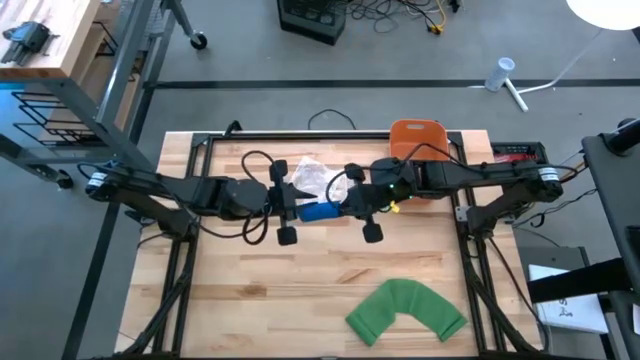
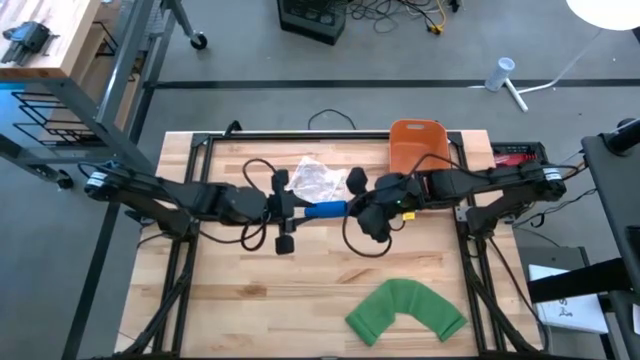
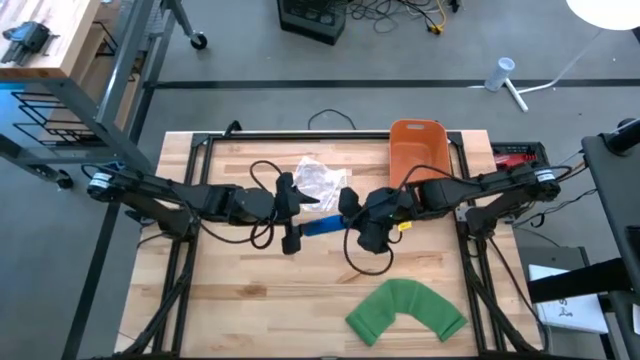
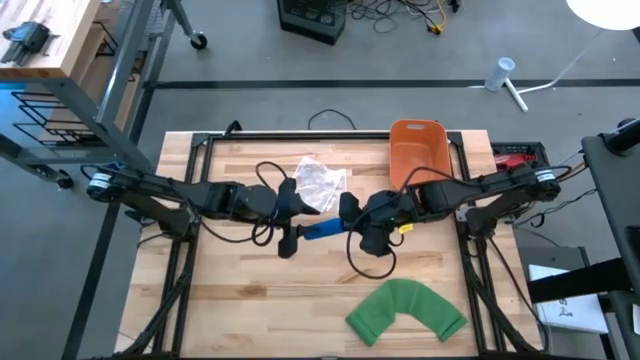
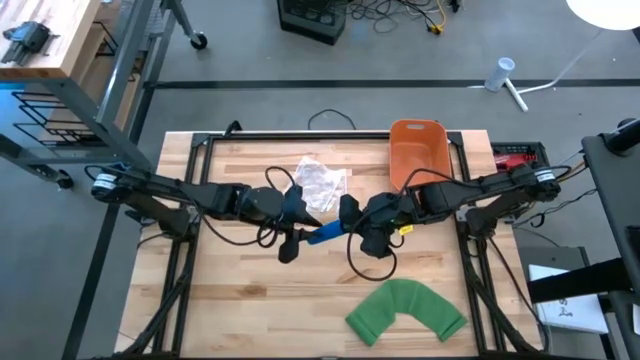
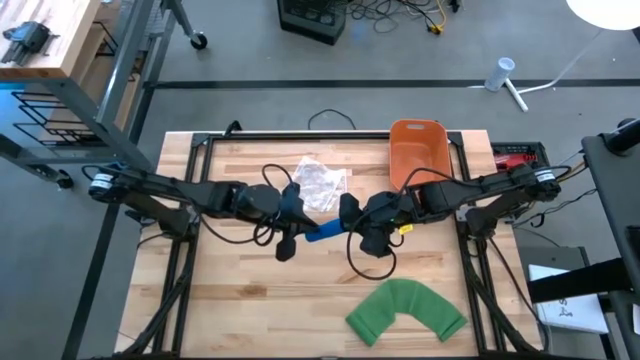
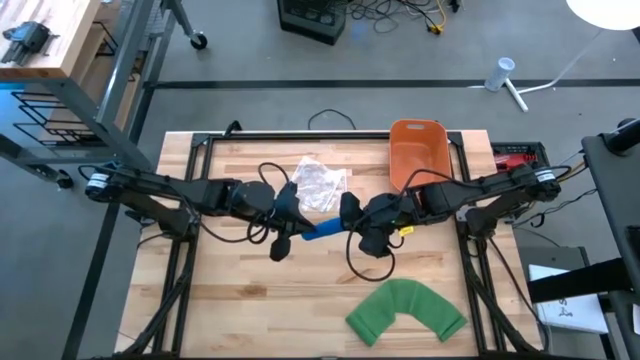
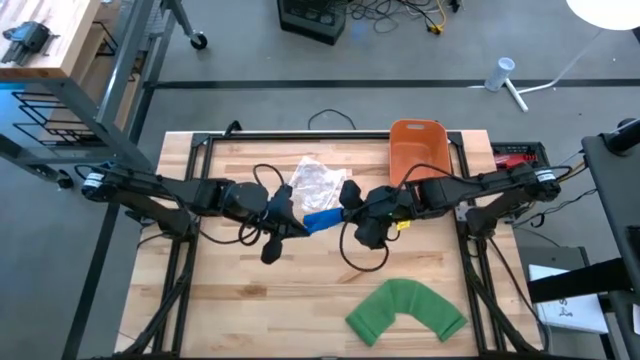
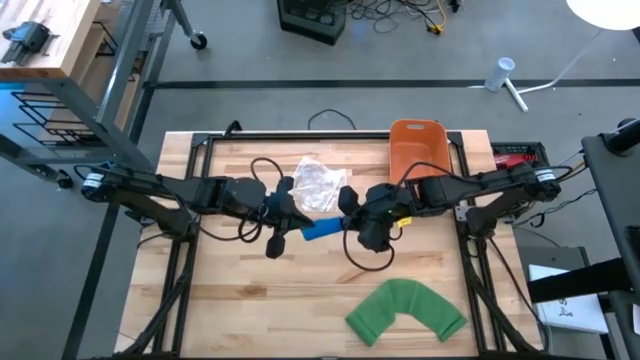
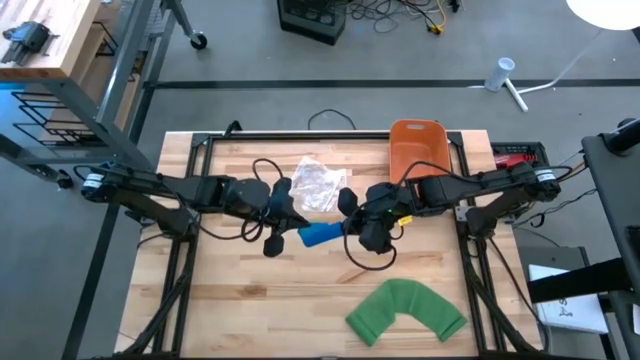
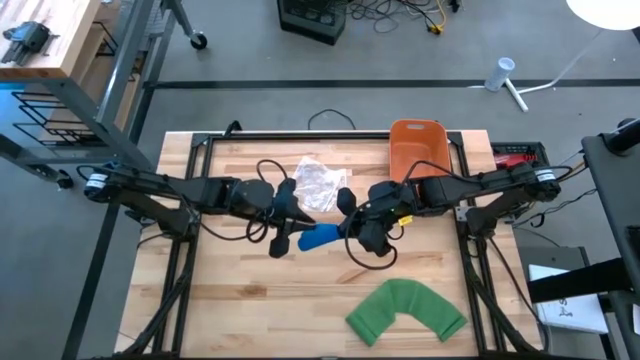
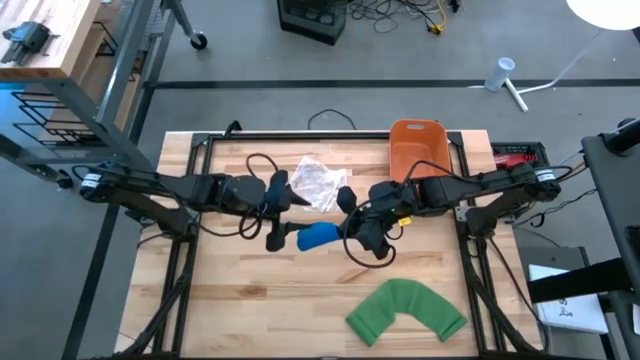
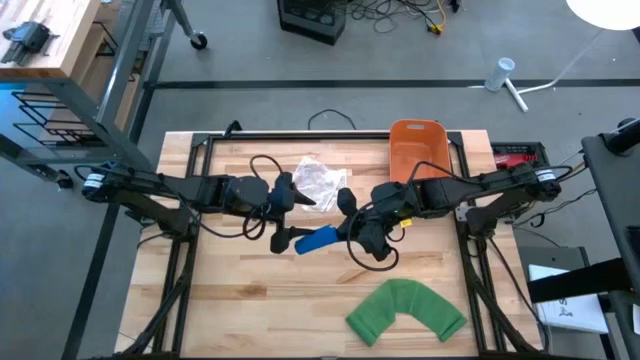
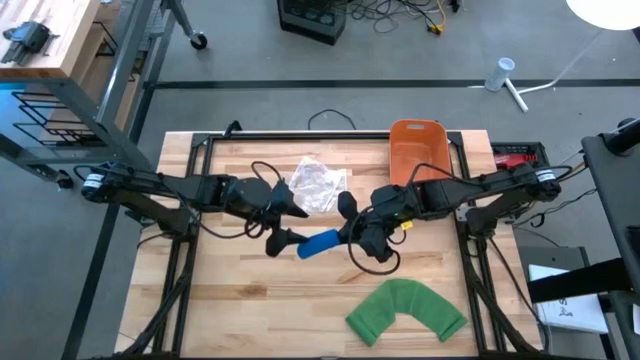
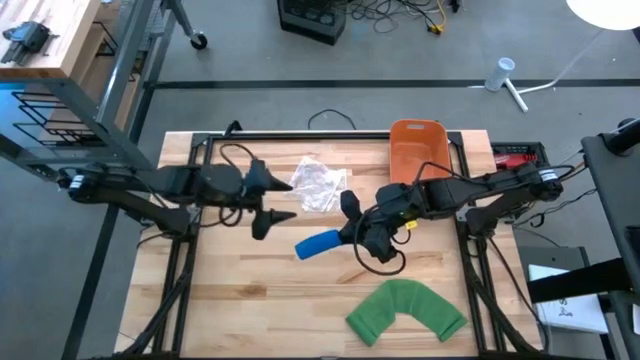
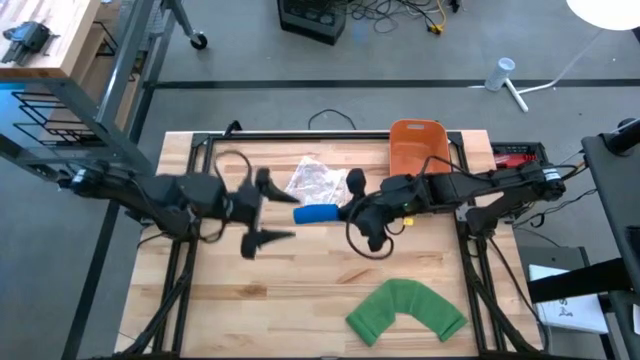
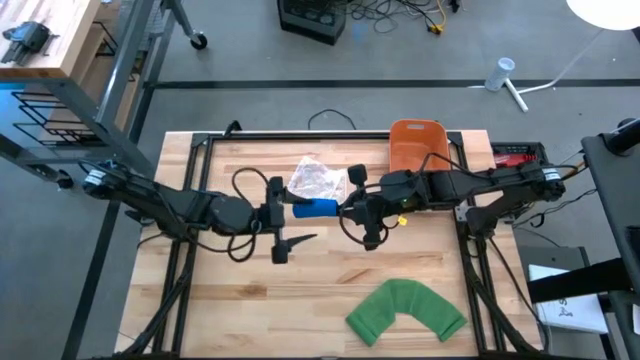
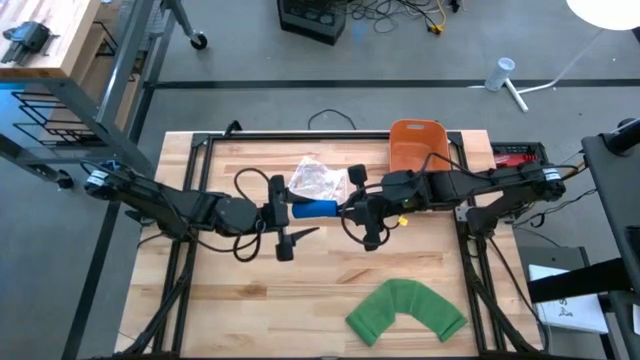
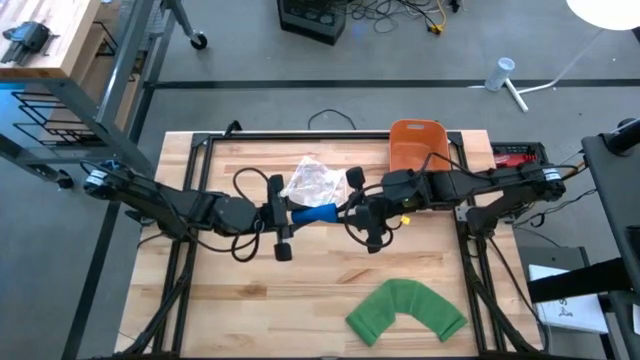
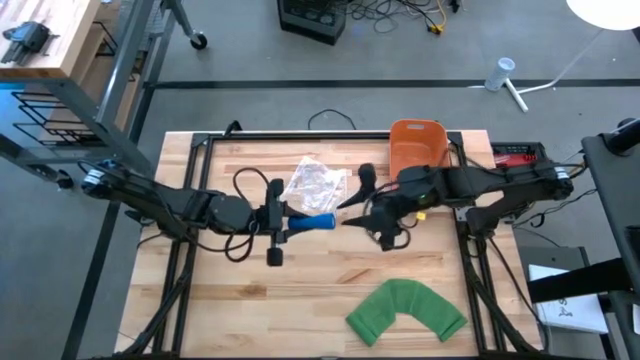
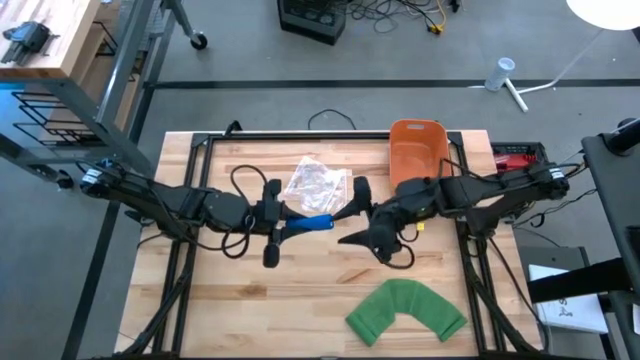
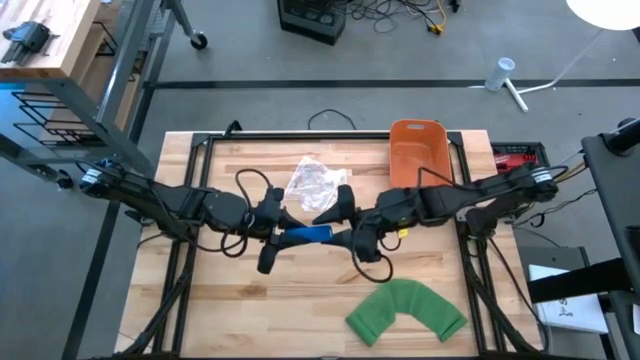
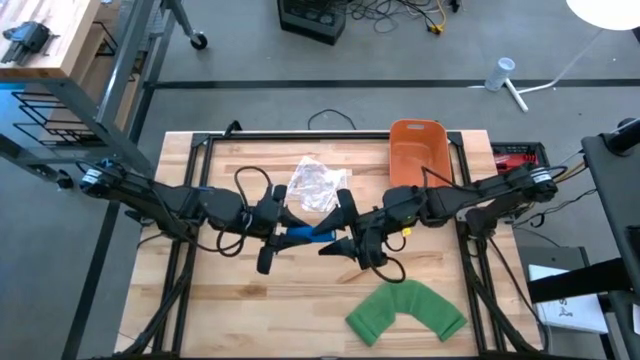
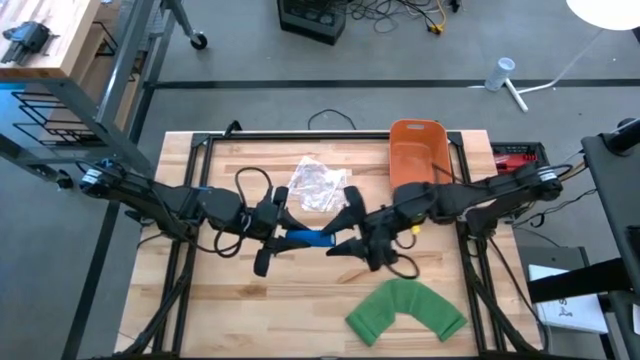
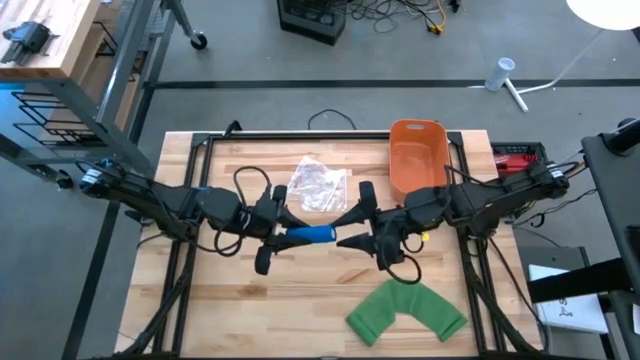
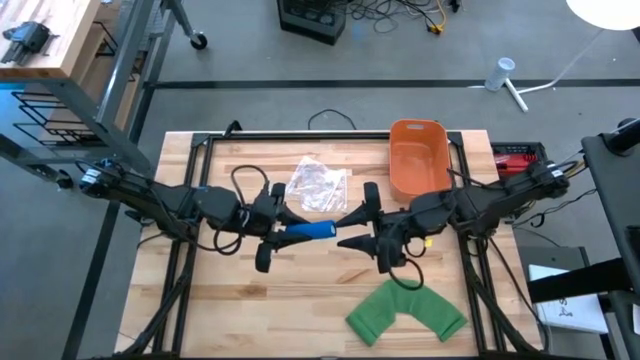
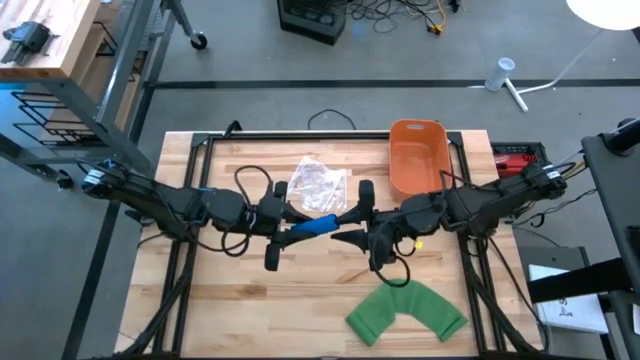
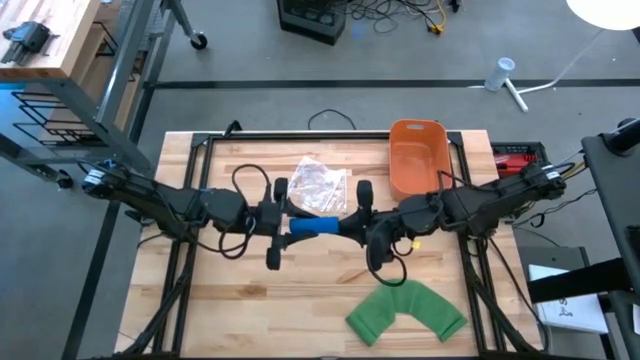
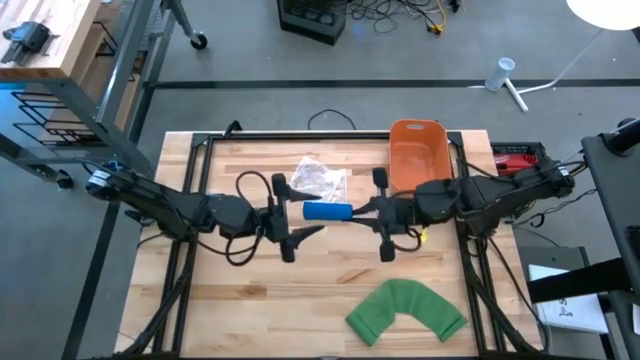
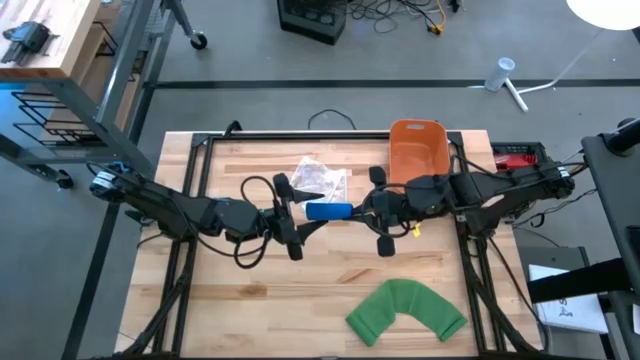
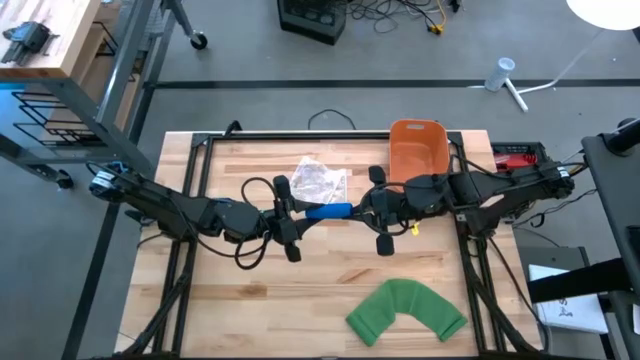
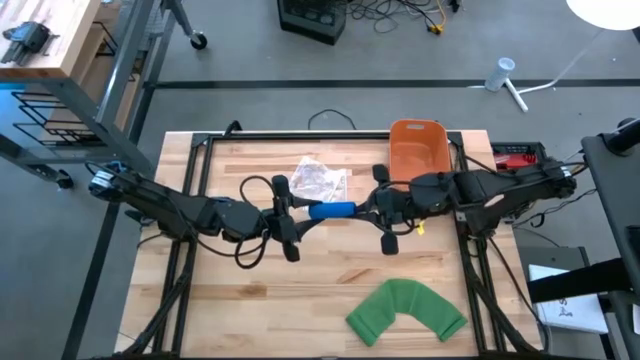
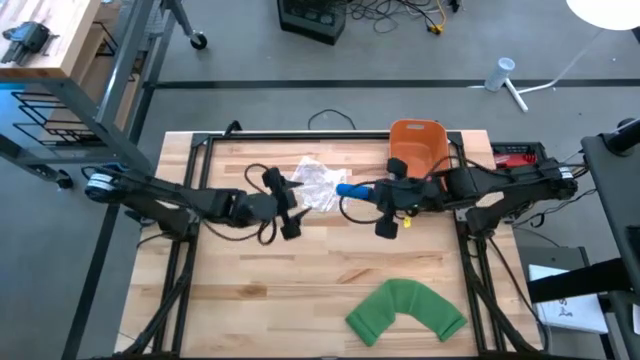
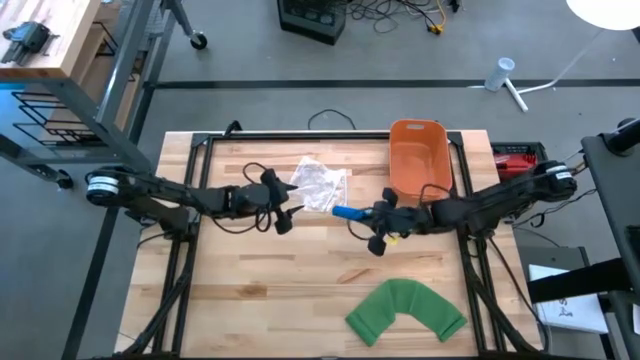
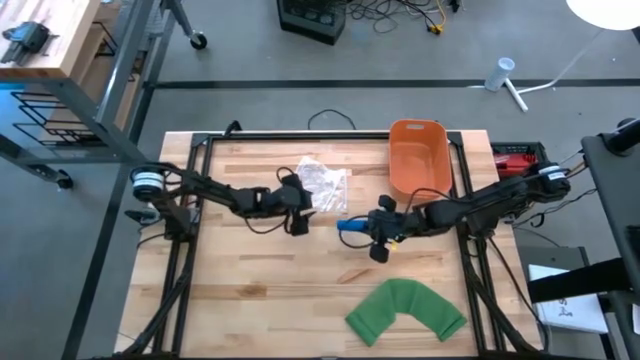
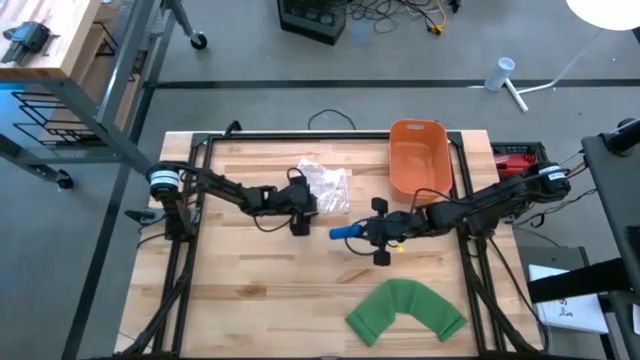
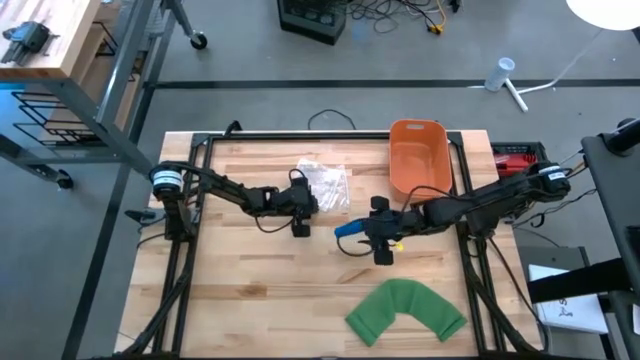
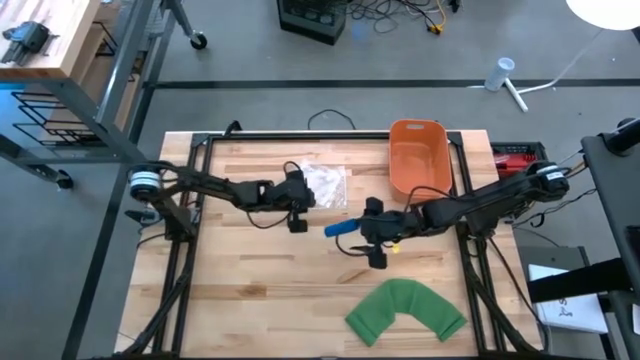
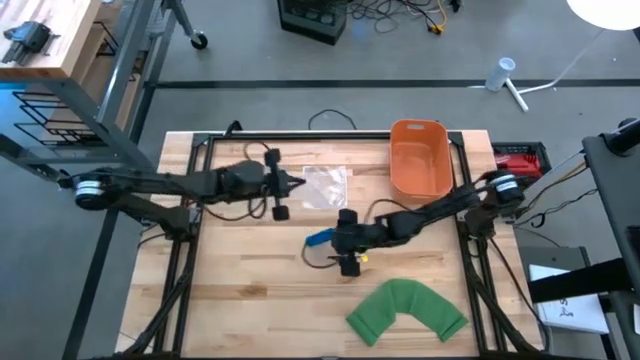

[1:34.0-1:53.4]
Task: Roll bandage
Roll the blue bandage

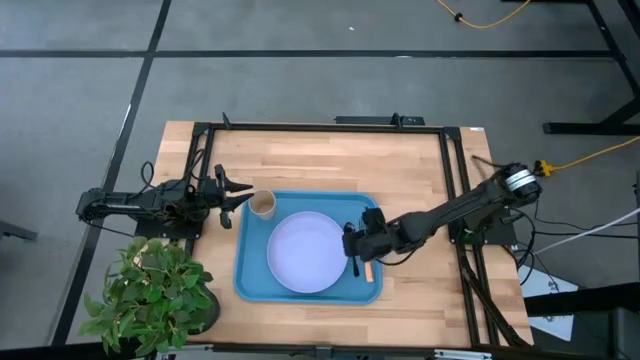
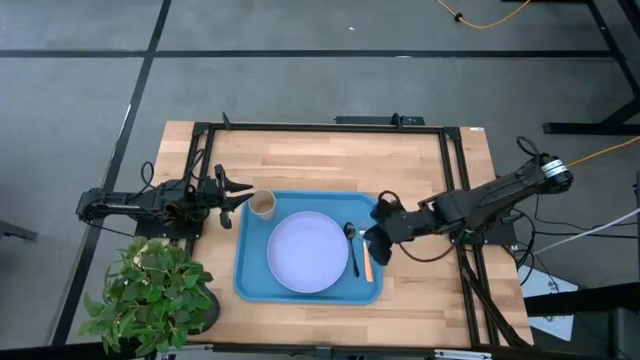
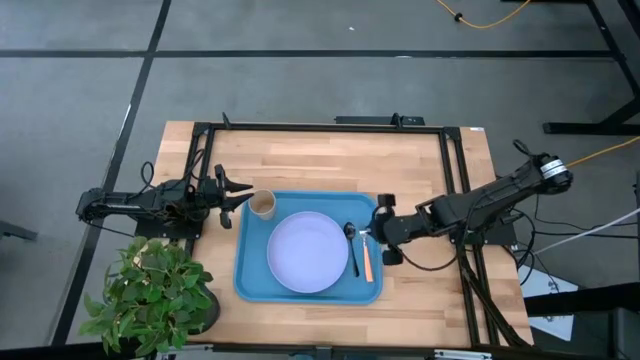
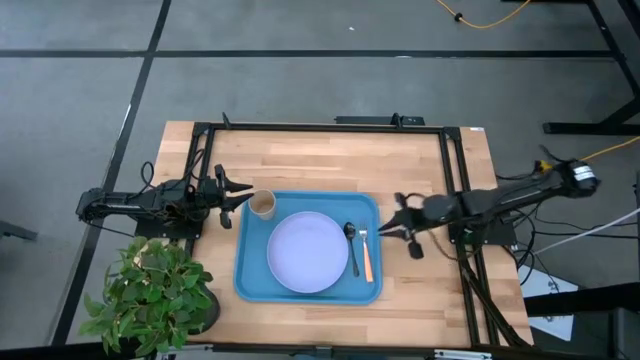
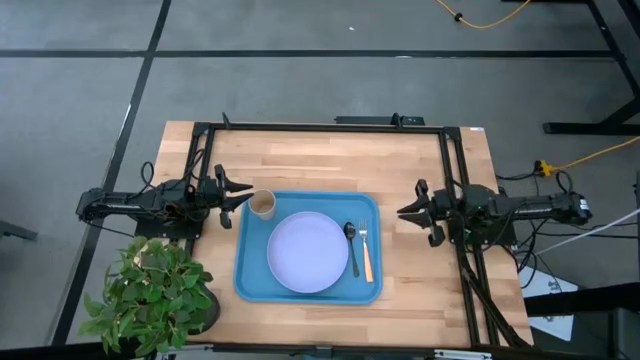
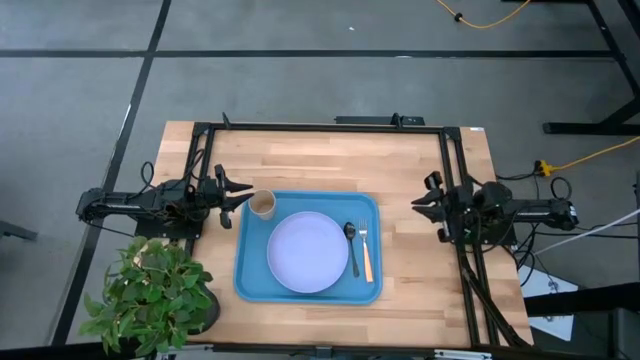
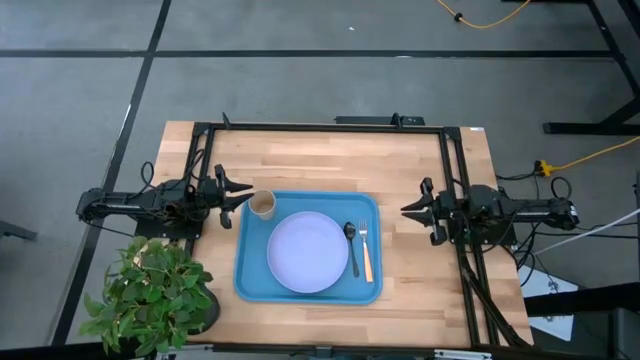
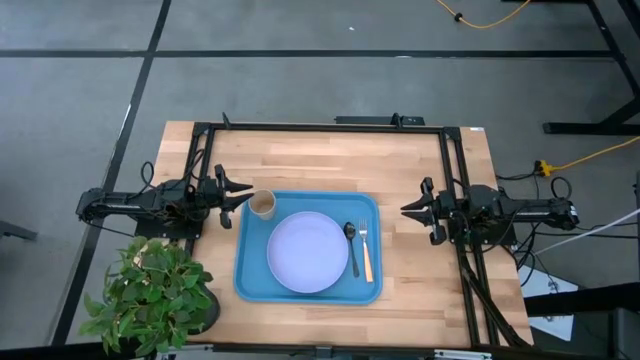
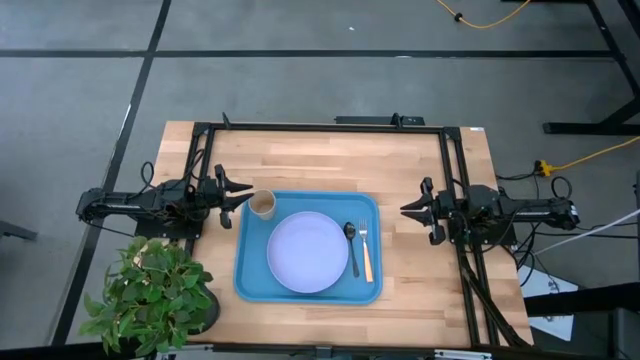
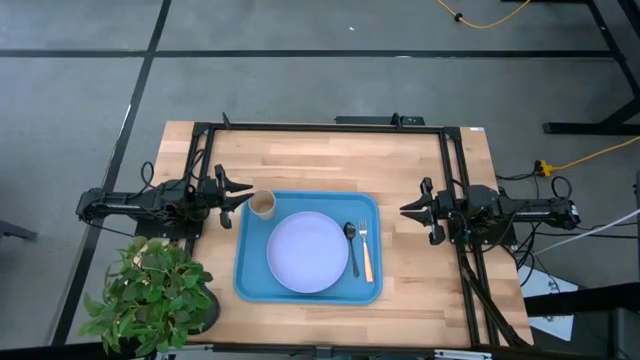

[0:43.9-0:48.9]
Task: Pick and place plate/cup/fork/spoon on tray
Return to Home Position
